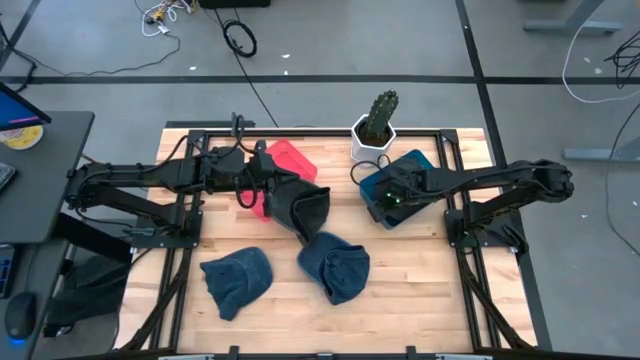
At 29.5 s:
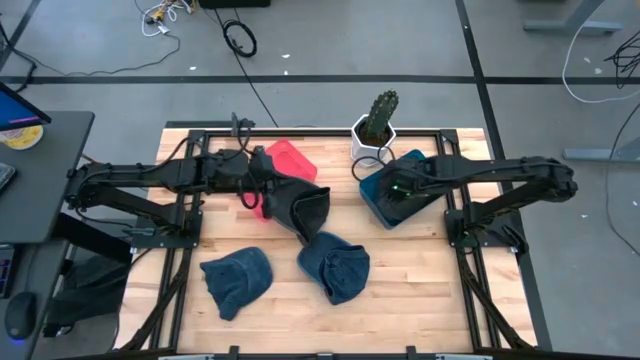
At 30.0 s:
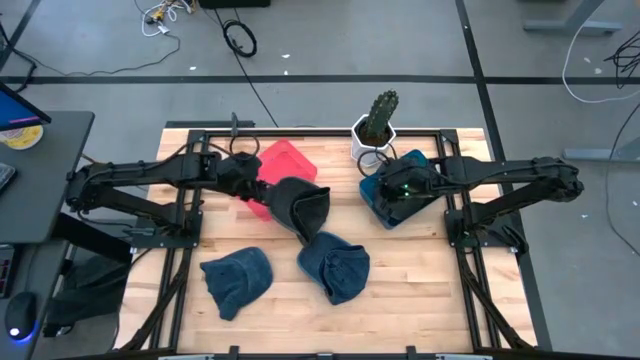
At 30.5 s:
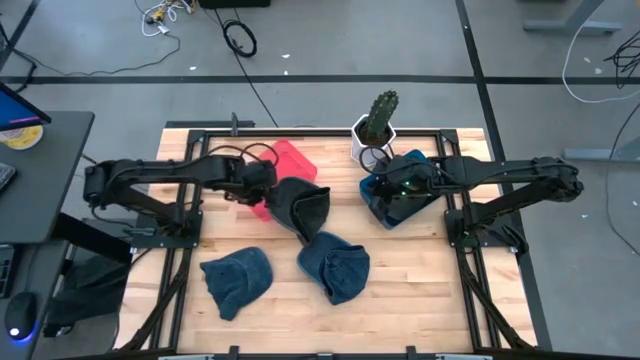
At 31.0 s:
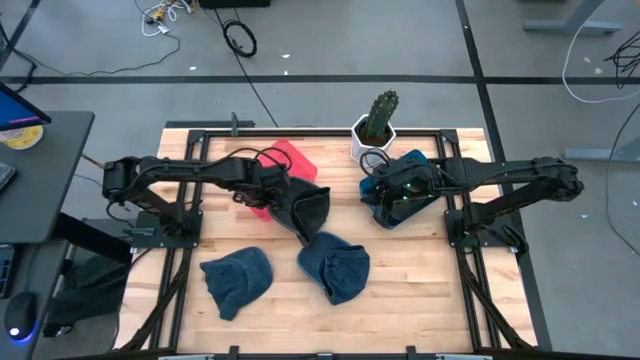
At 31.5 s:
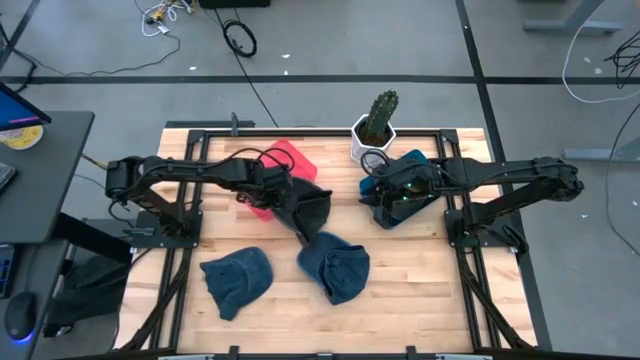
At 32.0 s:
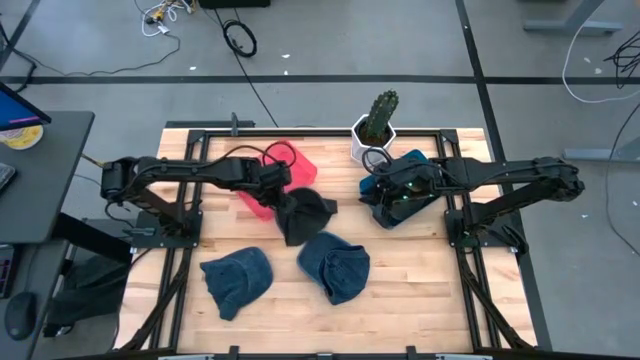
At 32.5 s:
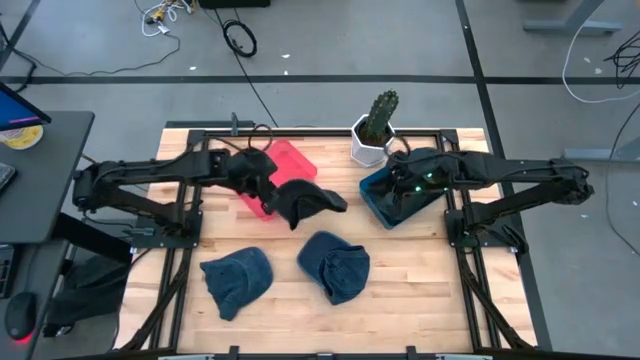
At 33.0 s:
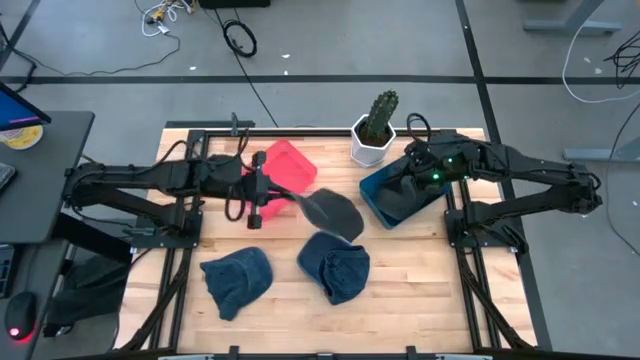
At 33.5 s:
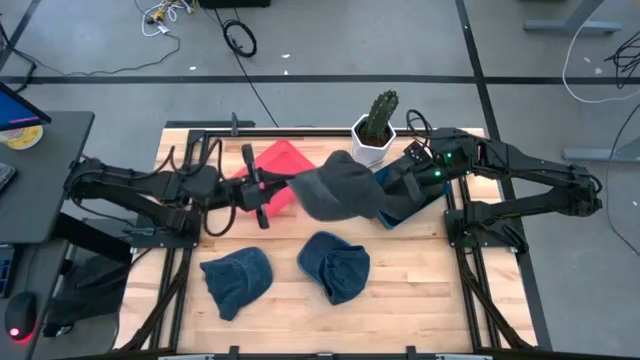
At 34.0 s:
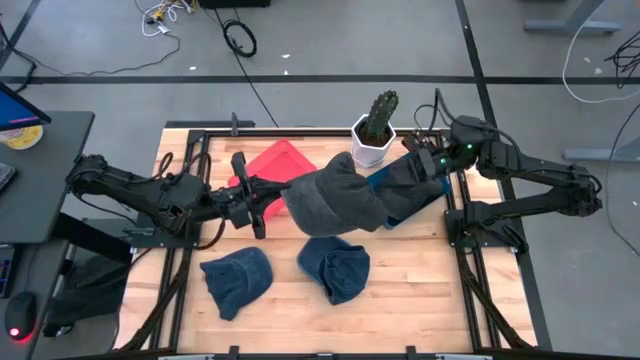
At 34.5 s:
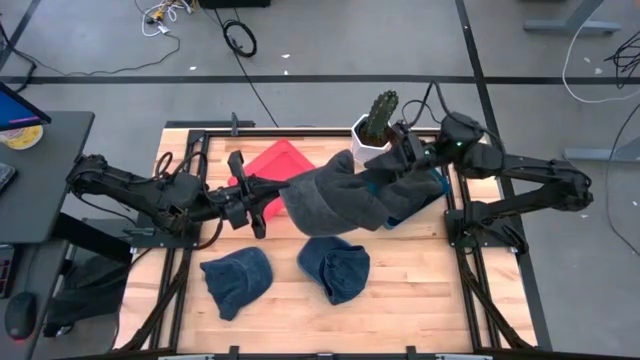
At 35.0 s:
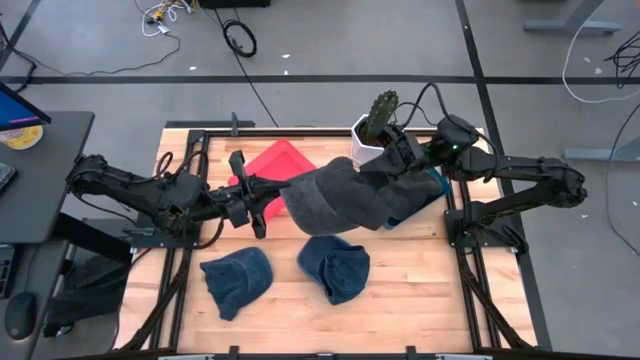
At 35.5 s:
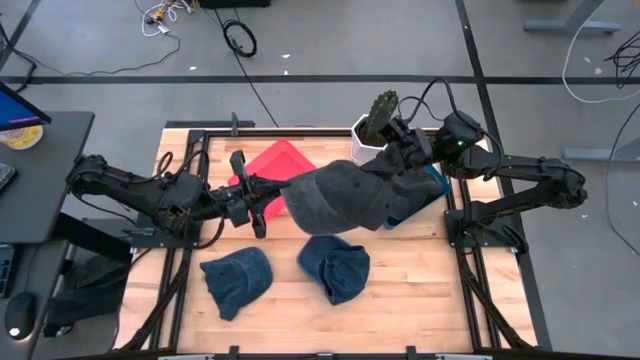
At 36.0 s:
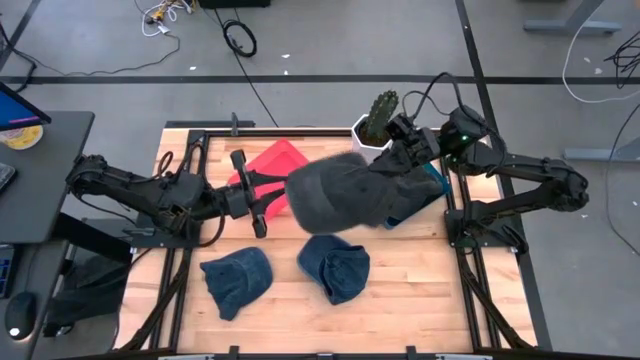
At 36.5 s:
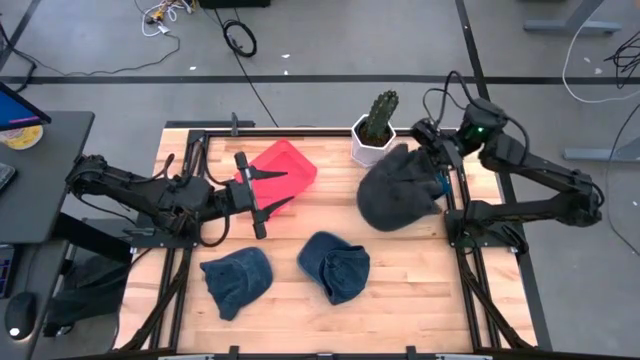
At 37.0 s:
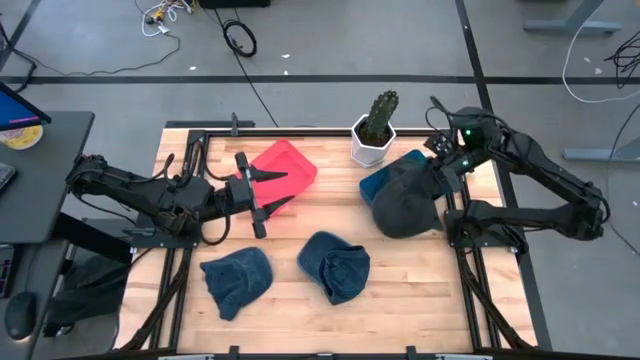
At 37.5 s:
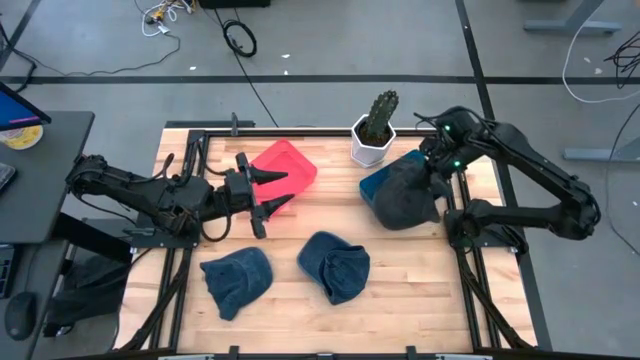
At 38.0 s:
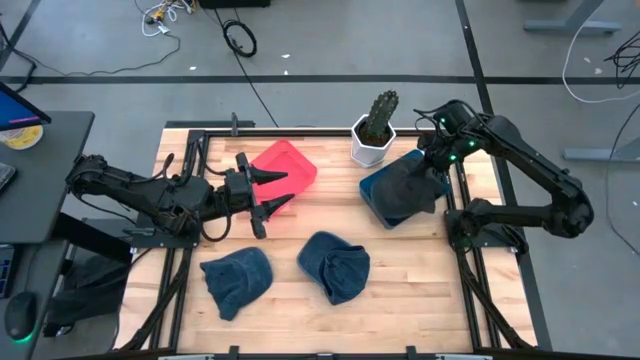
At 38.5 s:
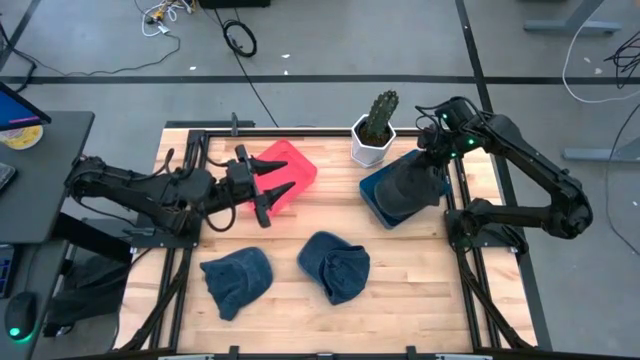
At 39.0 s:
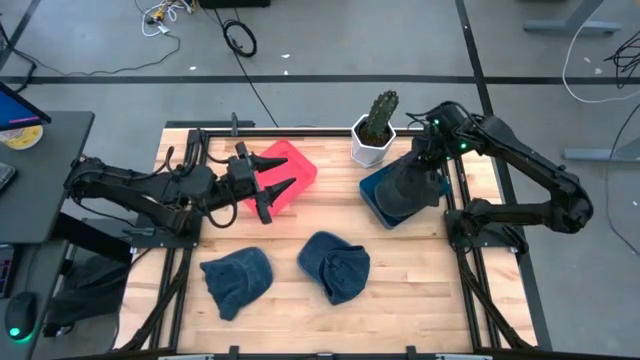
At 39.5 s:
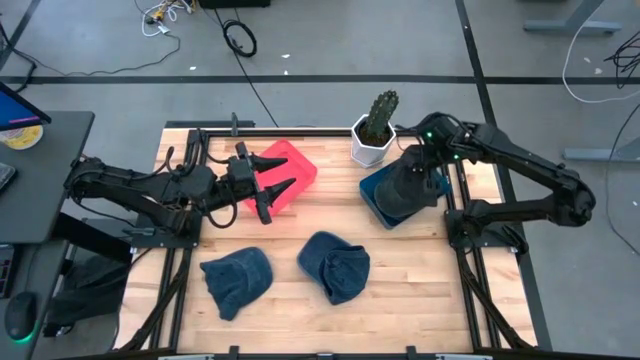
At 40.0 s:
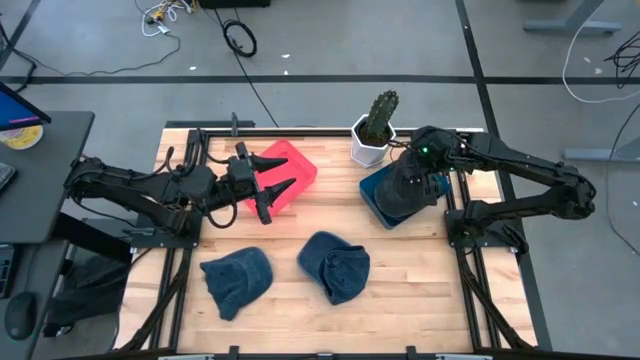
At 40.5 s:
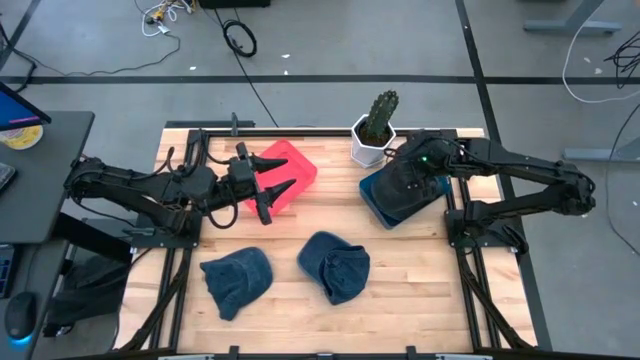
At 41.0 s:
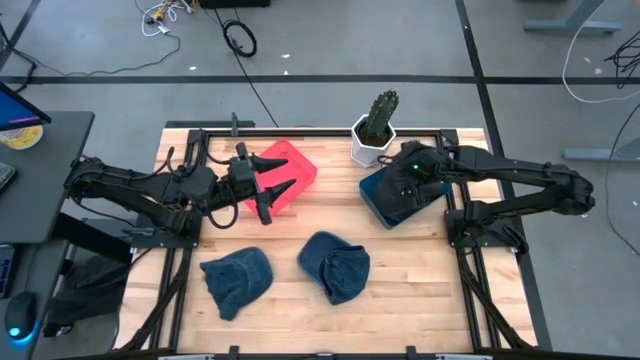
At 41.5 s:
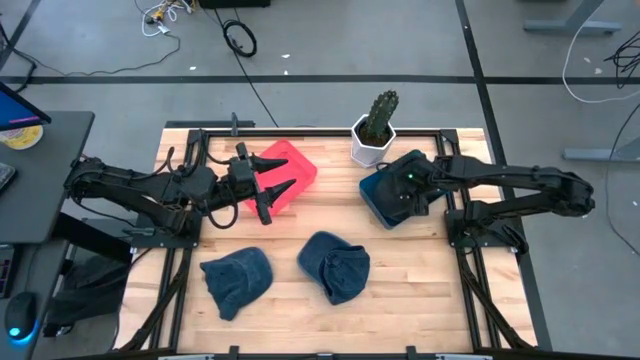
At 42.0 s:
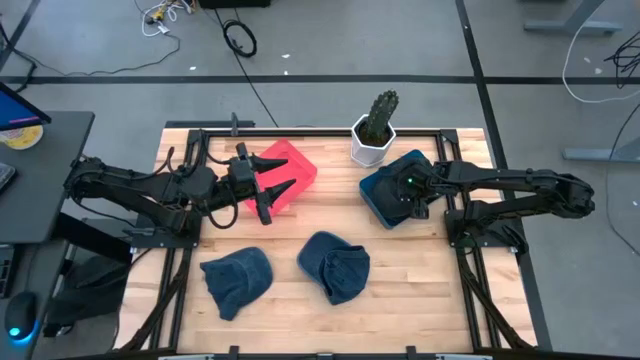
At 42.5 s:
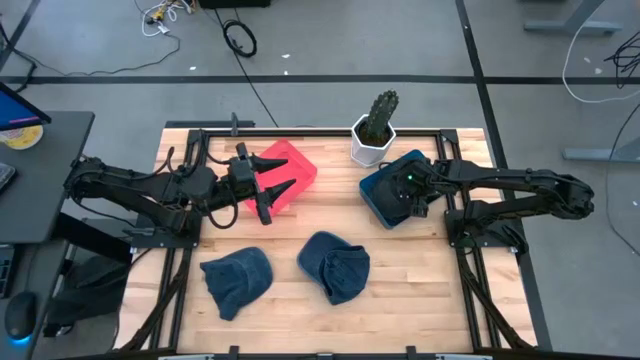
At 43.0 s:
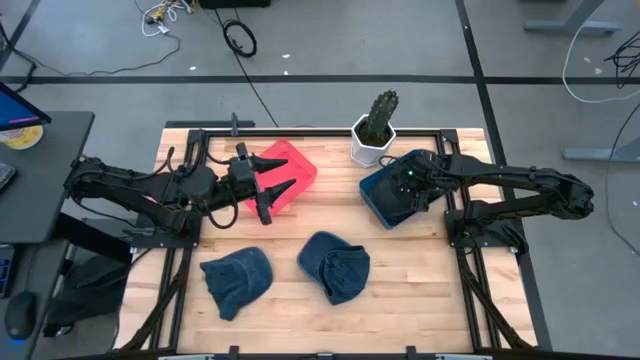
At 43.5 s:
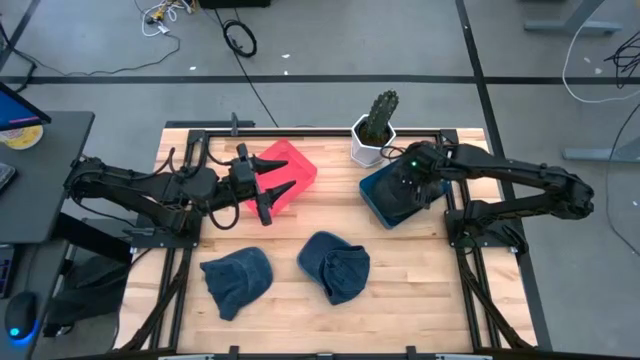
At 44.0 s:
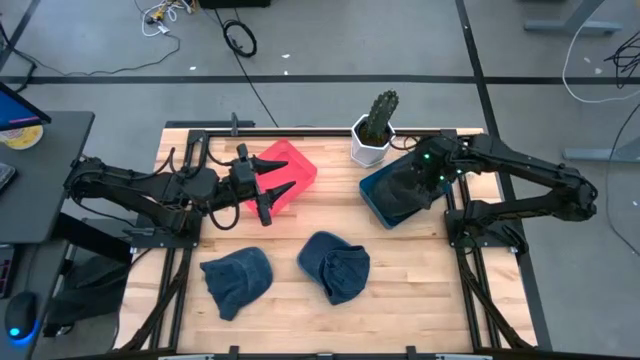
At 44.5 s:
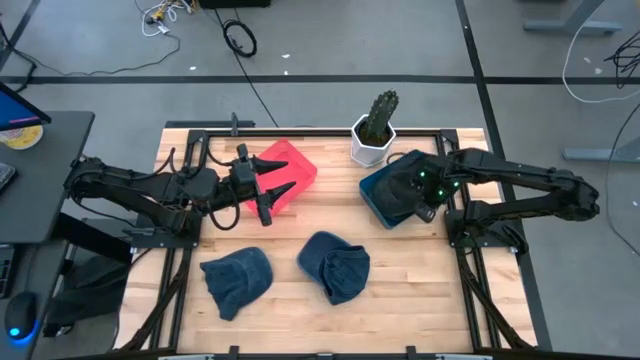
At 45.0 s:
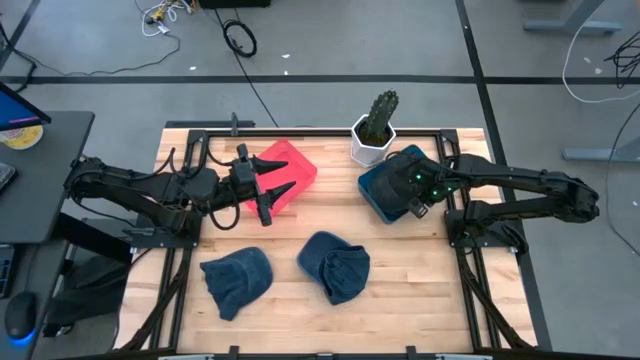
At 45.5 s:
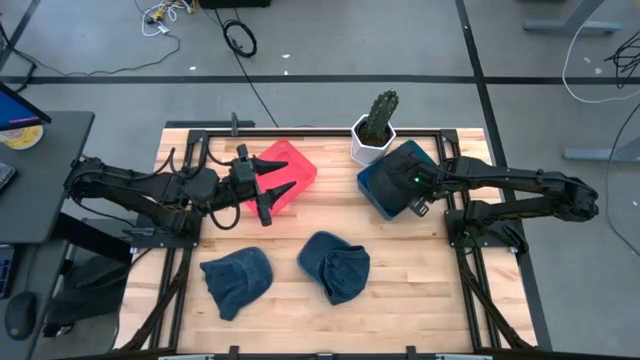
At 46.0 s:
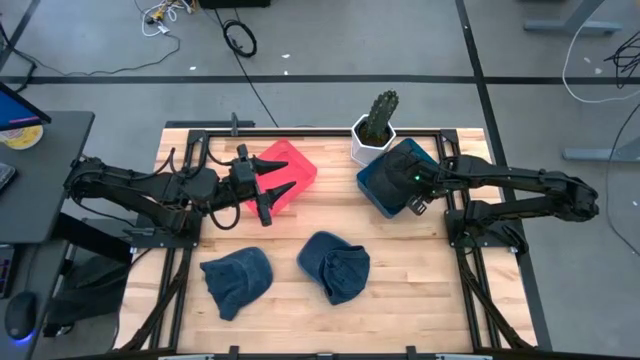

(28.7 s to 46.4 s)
Task: Pick & Place hat
Put the black cap into the blue bin

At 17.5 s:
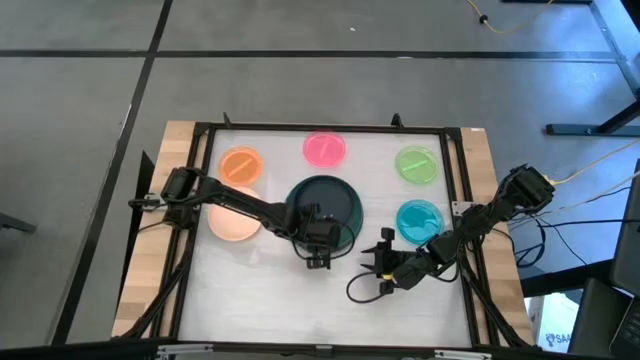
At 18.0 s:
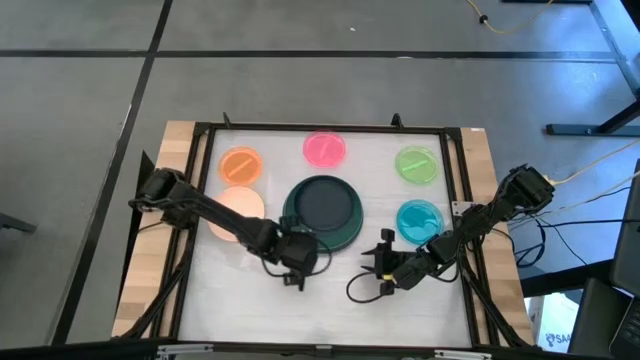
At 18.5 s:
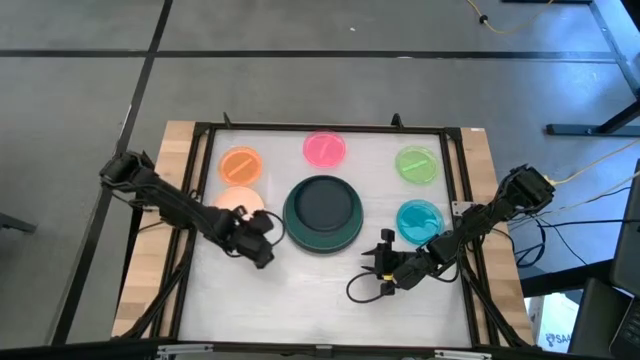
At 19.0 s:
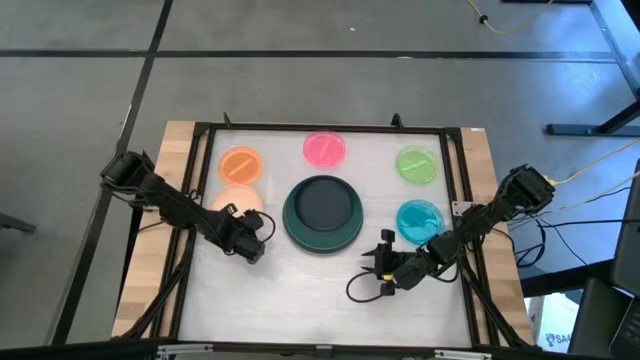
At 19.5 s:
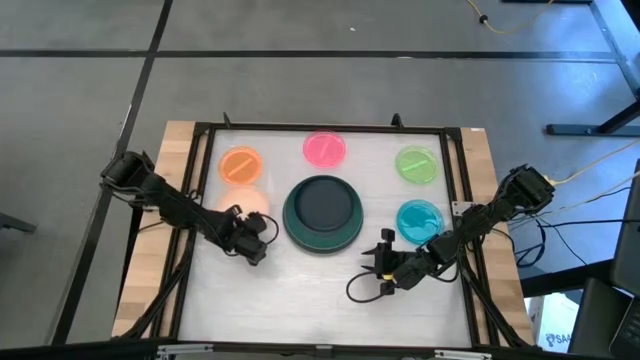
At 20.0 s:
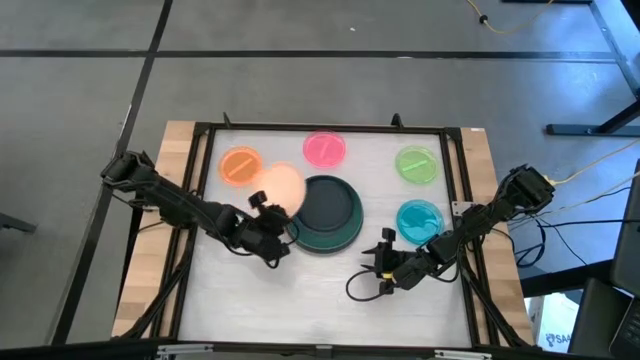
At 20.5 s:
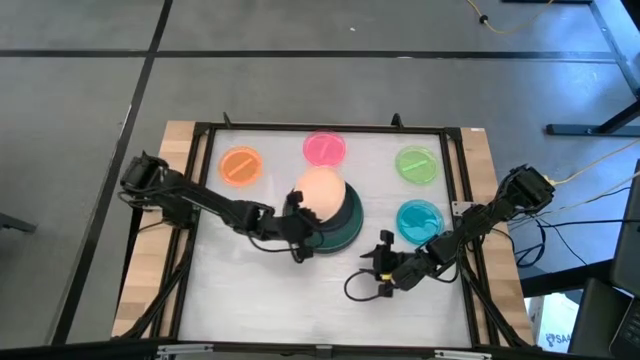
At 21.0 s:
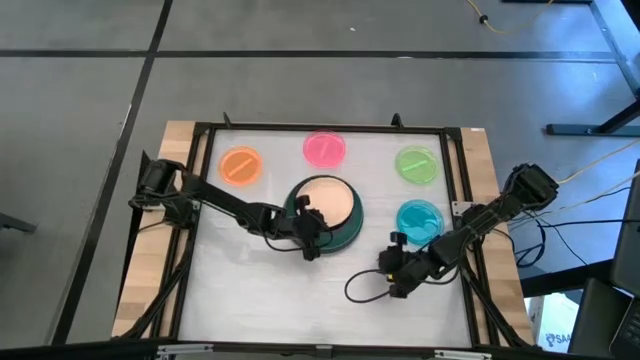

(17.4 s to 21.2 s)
Task: Stack plastic plates
Stack the medium light orange plate on top of the medium black plate

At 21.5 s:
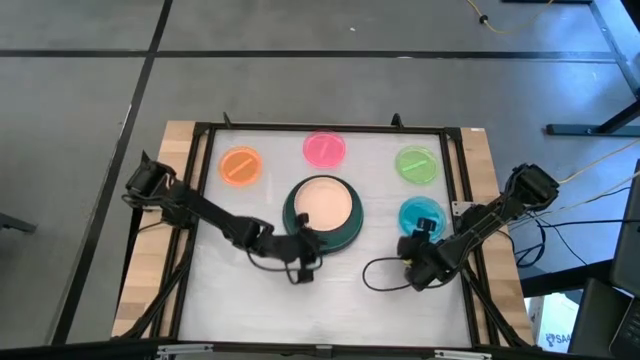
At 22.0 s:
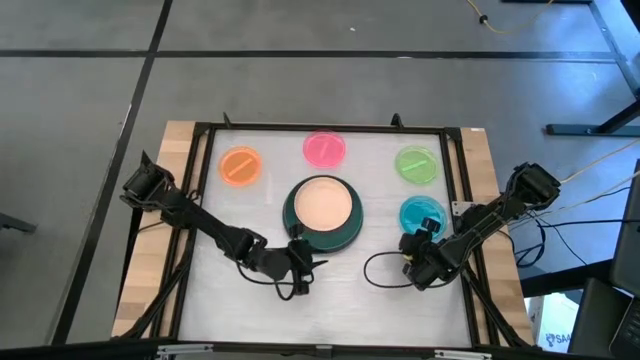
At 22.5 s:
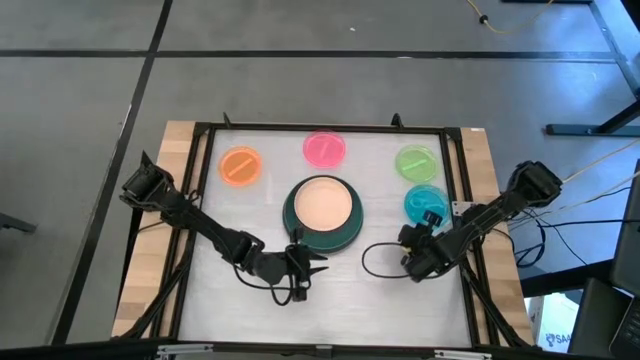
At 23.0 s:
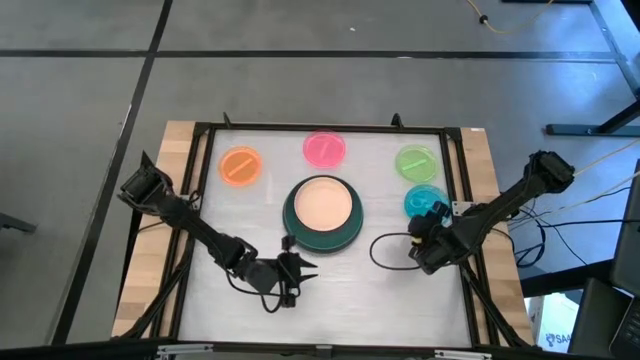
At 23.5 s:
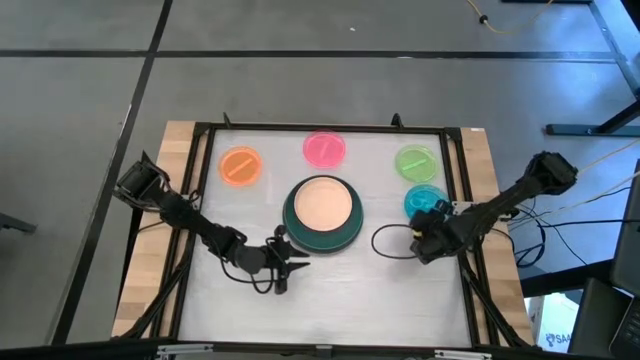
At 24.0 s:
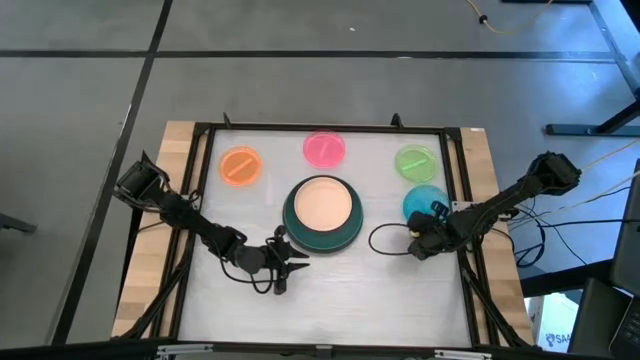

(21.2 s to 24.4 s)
Stack the small blue plate on top of the medium light orange plate
